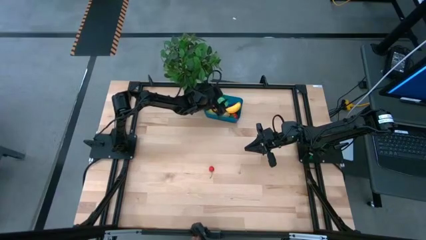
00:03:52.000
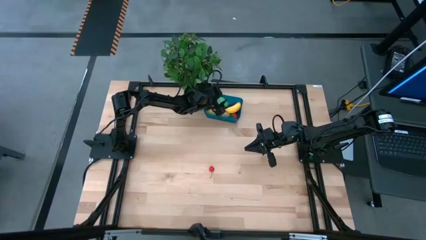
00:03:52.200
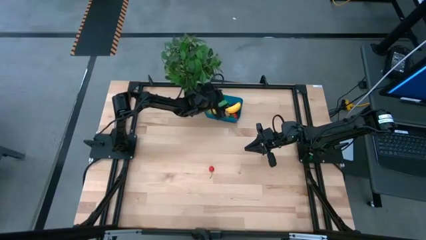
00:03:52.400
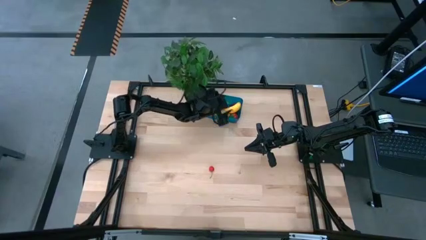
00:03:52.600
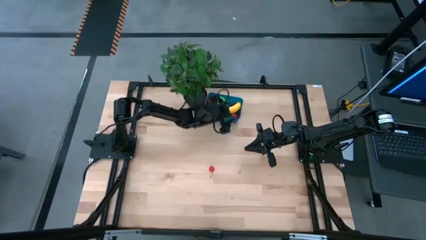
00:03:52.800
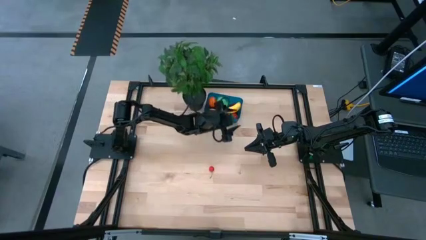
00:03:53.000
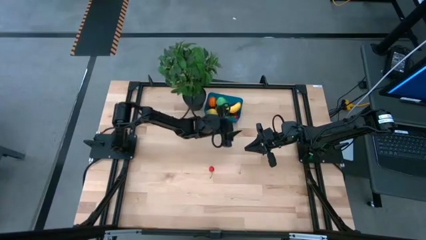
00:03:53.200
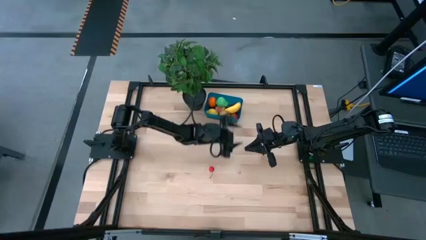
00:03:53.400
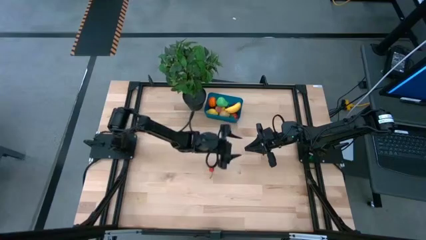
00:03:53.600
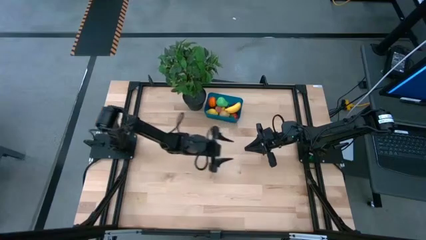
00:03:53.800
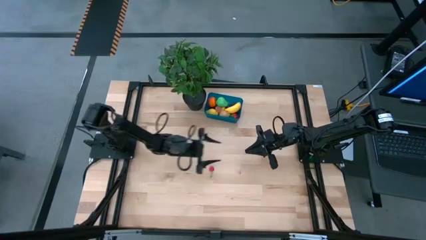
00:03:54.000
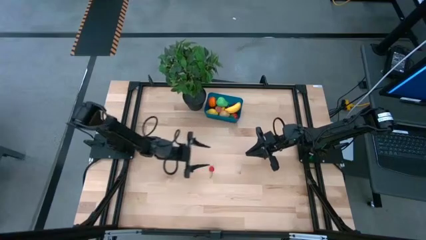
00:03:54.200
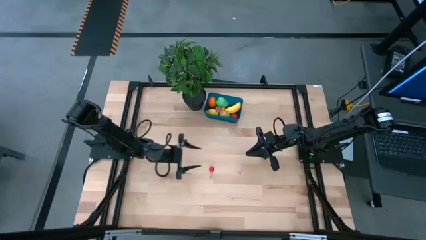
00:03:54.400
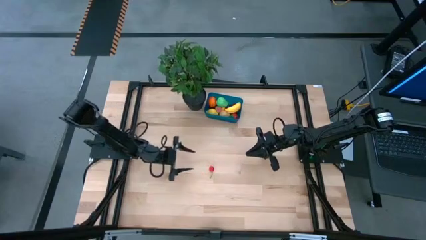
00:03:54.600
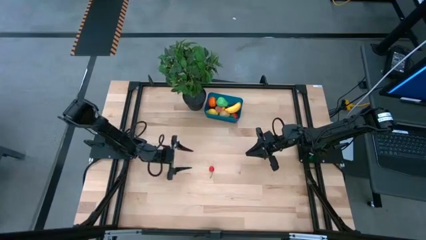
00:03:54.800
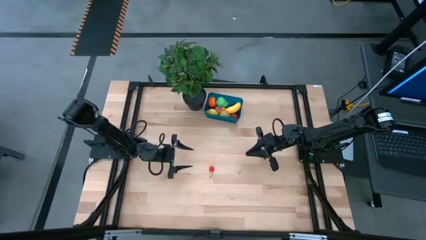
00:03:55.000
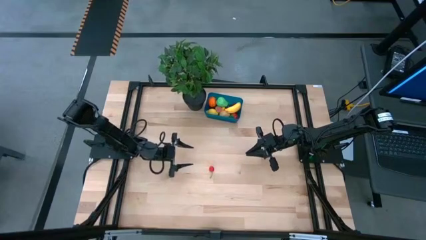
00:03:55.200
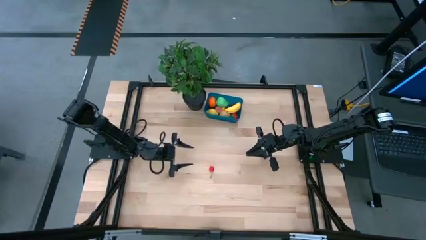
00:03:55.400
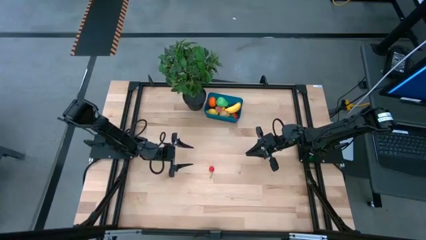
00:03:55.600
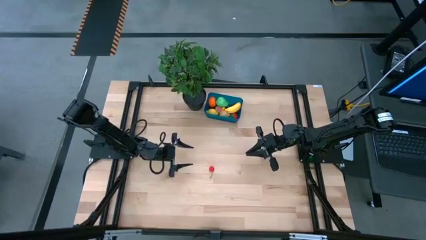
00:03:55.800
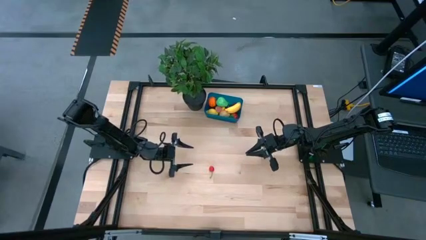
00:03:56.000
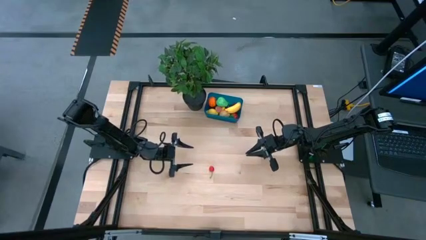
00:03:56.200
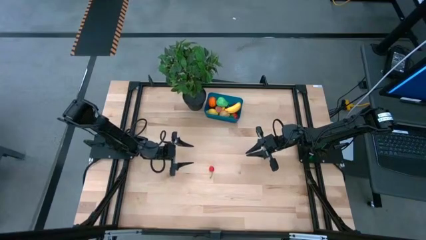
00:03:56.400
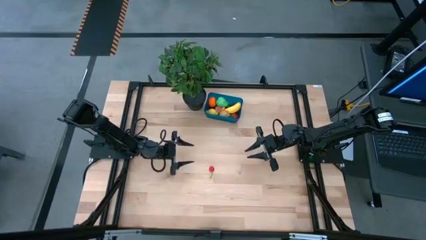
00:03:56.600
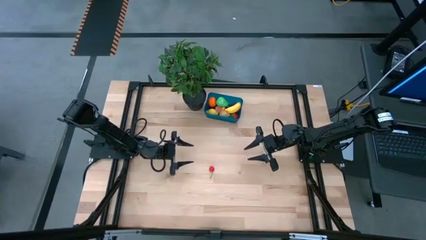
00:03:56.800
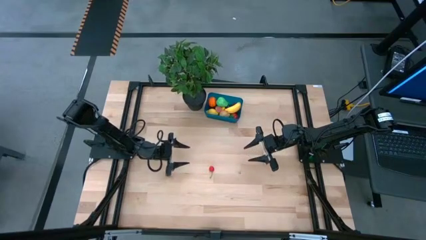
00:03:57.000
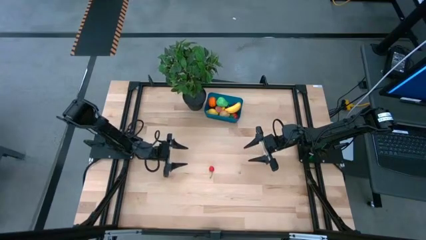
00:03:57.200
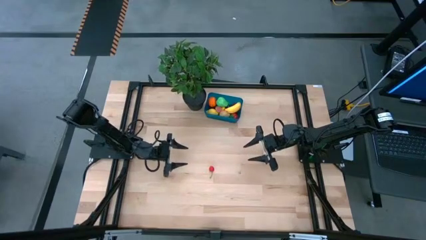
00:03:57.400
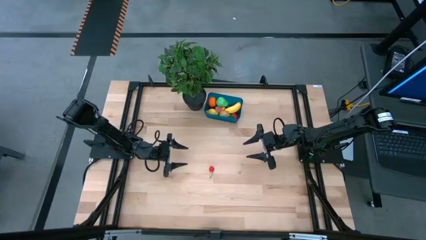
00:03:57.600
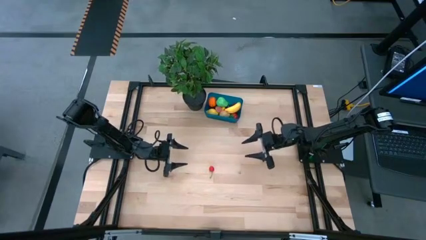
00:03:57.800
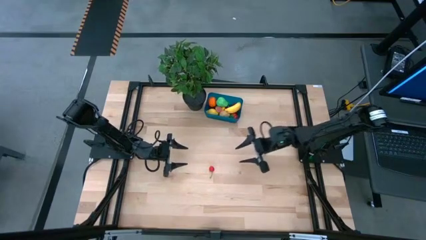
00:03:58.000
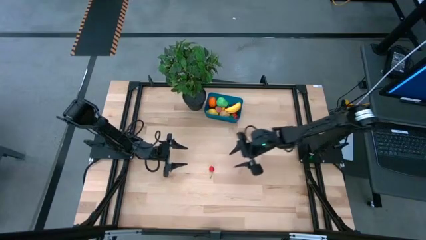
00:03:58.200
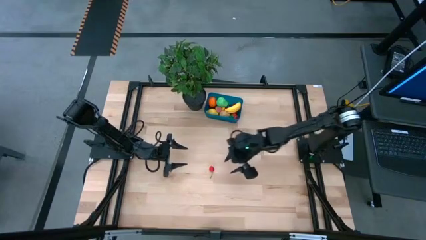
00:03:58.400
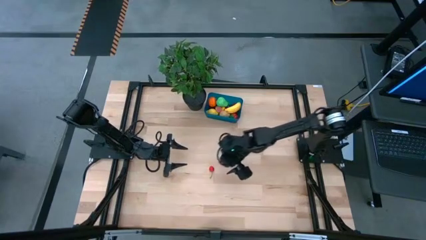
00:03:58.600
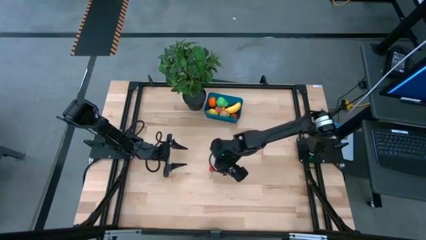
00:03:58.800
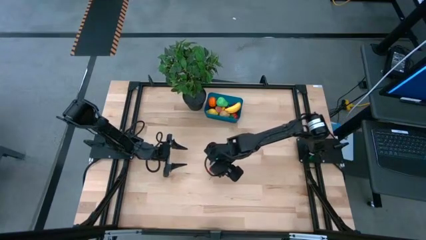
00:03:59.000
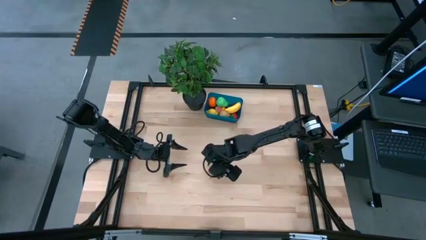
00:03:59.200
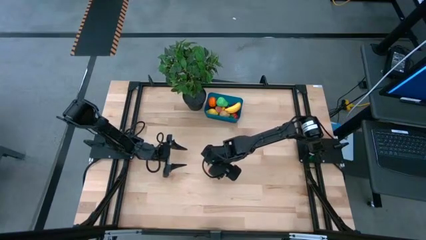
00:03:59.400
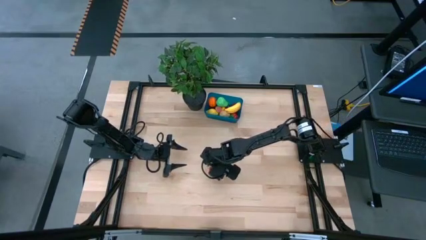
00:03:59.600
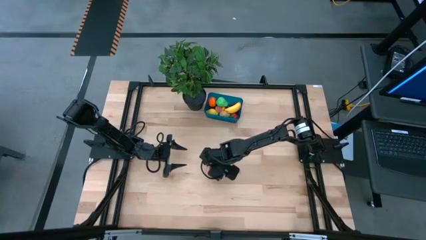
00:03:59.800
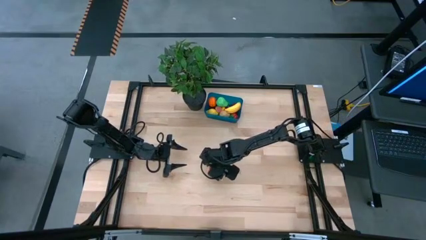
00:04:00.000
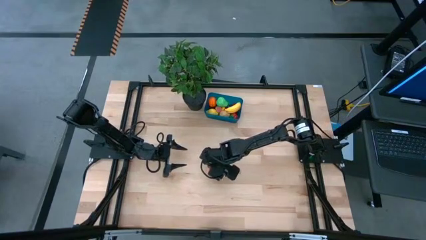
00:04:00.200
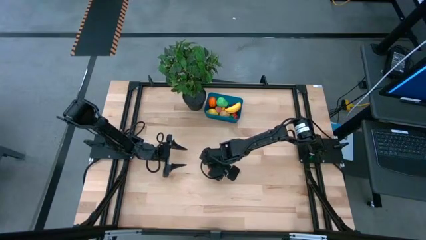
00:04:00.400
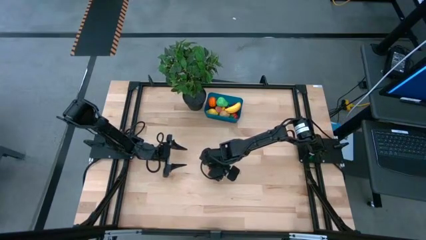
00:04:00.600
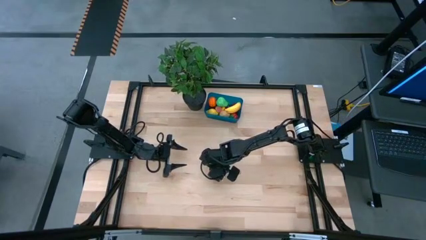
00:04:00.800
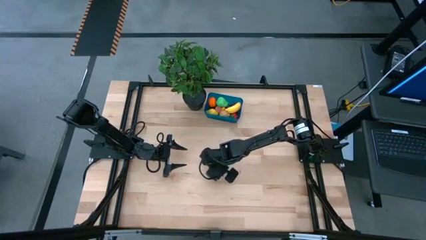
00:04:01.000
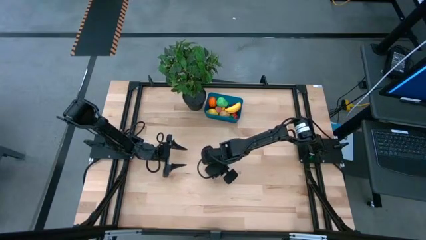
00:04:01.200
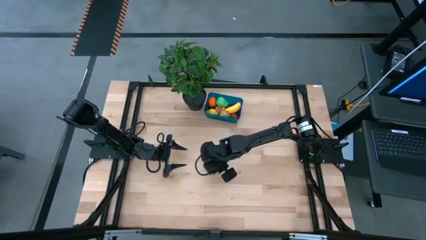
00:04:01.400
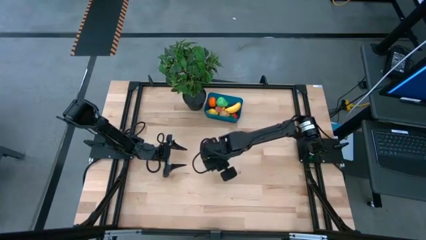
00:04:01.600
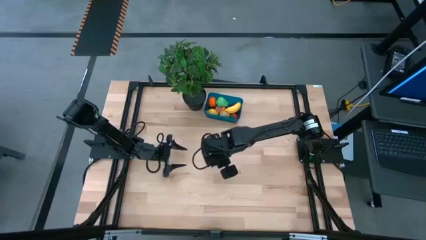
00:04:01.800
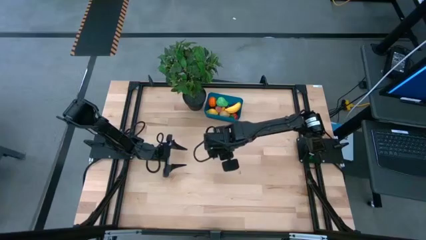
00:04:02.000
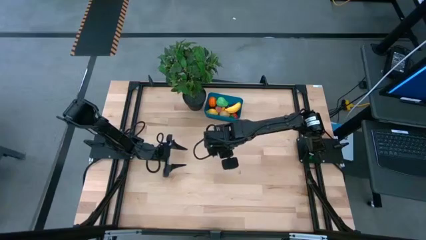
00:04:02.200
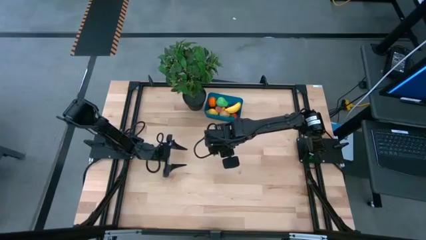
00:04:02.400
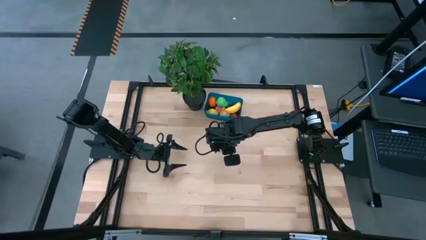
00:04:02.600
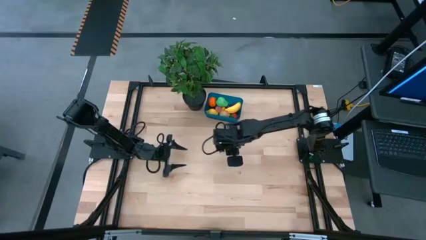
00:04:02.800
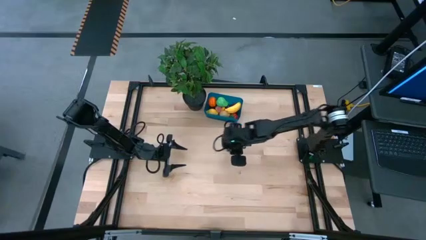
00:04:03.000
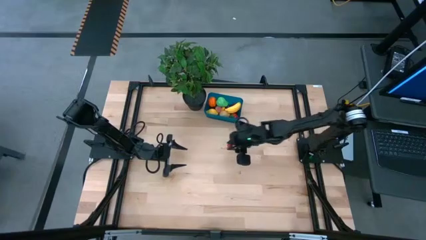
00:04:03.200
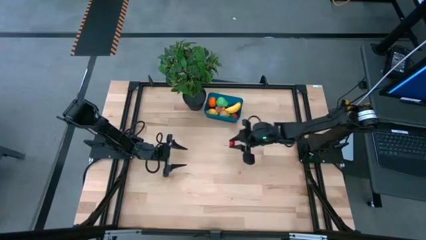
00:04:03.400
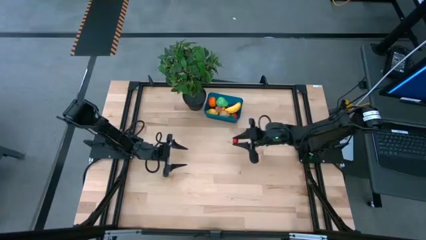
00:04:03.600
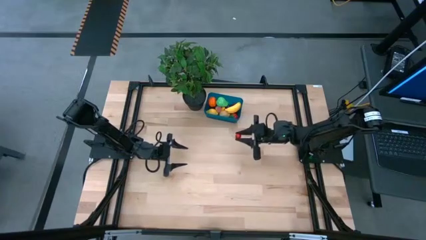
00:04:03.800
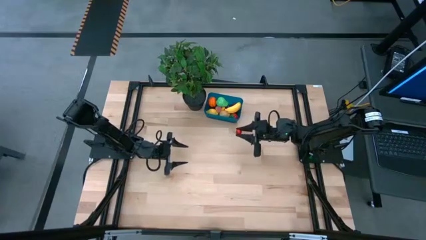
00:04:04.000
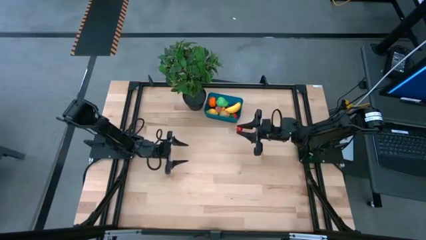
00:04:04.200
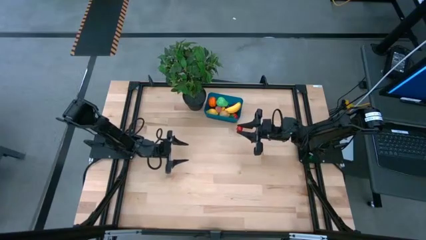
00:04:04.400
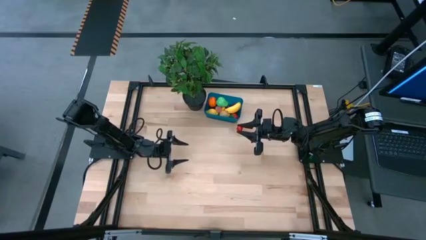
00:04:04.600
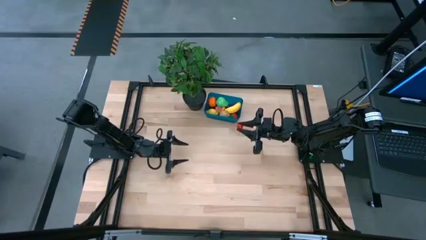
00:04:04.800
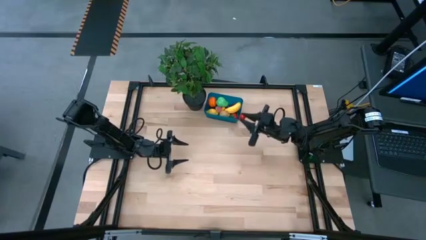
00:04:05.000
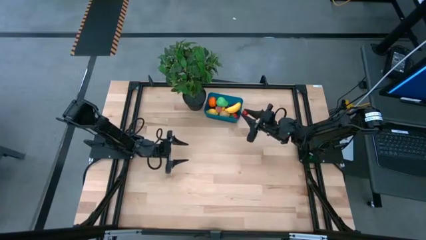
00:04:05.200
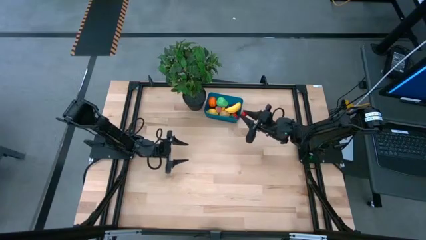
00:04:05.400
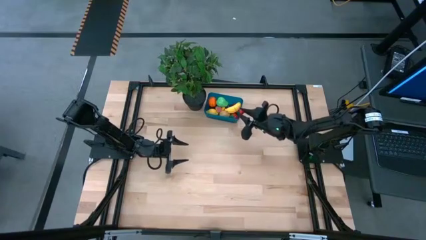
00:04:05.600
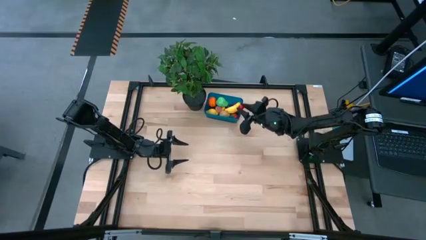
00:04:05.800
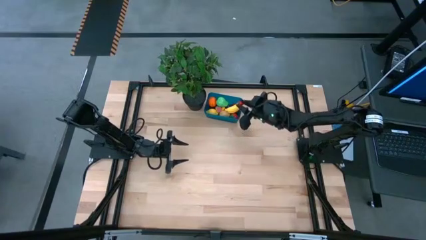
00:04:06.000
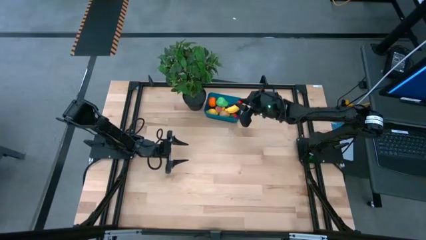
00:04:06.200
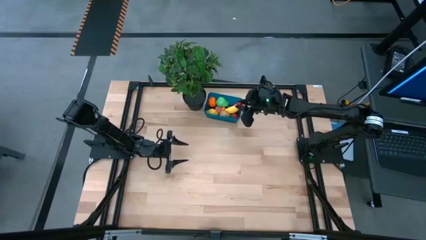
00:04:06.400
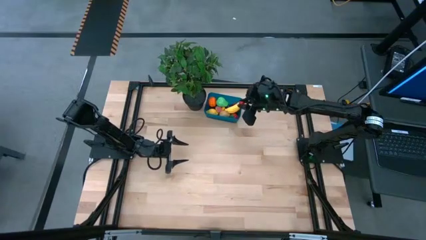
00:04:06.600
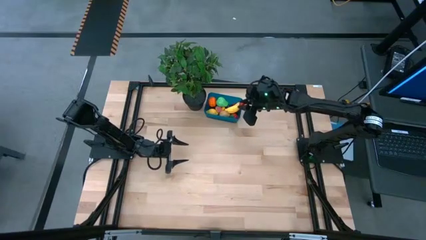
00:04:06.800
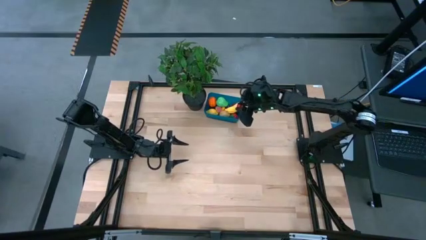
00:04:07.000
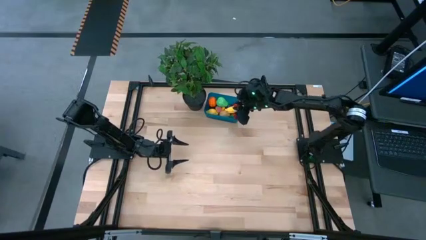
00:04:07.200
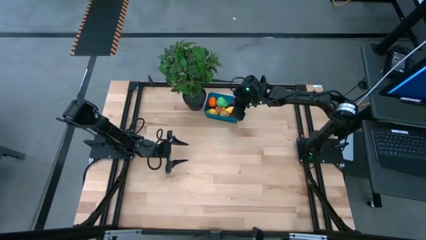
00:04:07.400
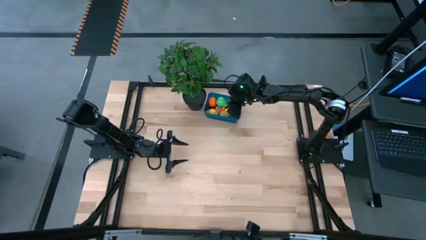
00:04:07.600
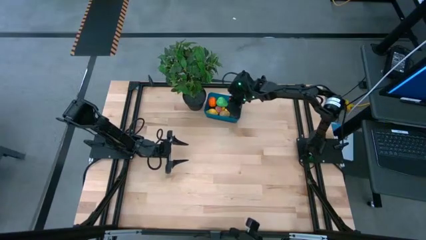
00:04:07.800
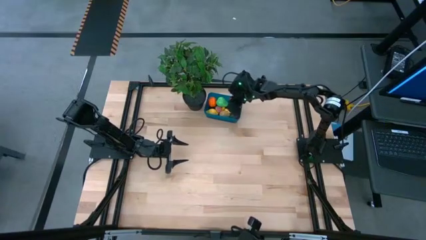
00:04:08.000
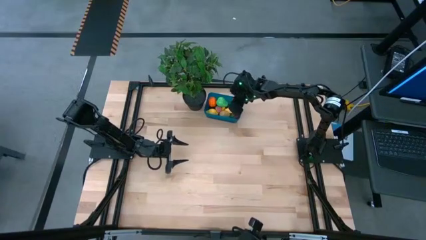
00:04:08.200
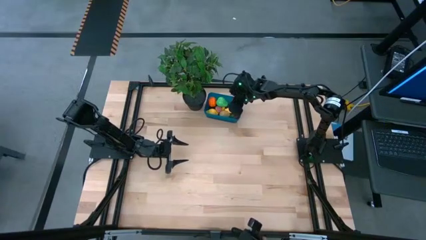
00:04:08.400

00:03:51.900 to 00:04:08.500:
Task: Pick and placing Produce into tupperware
Put the red cherry into the blue container
